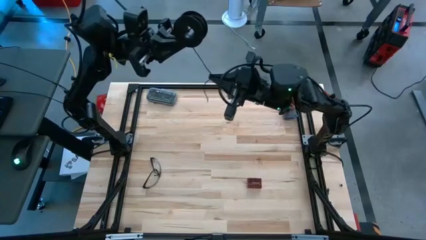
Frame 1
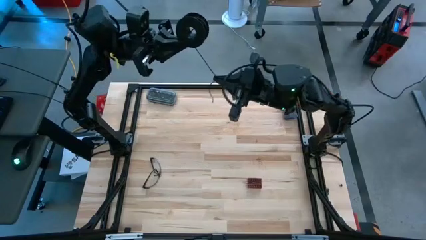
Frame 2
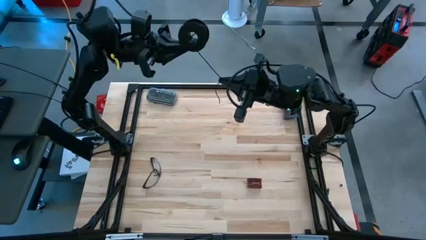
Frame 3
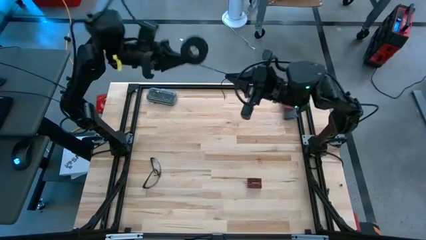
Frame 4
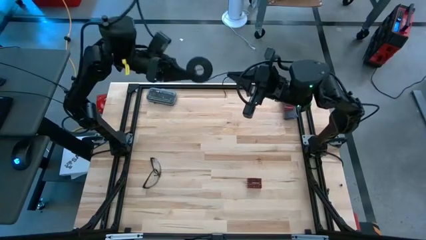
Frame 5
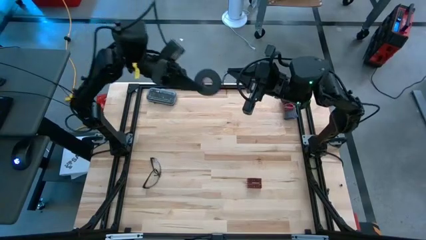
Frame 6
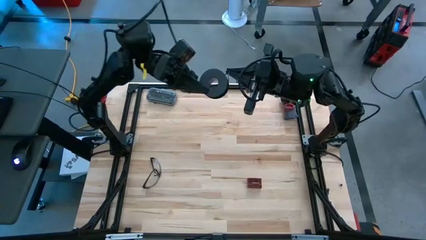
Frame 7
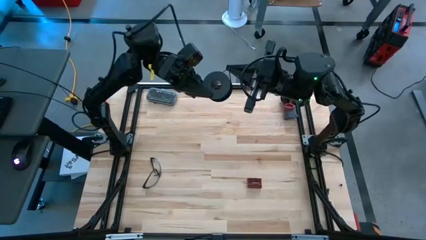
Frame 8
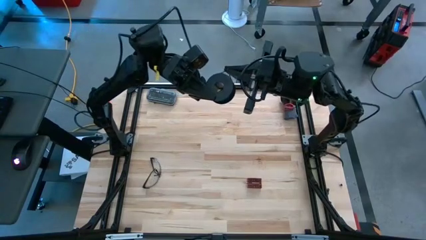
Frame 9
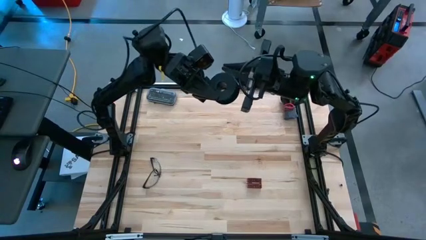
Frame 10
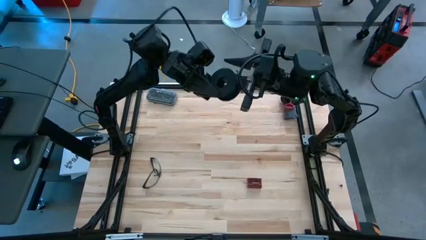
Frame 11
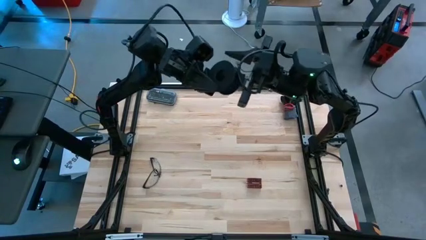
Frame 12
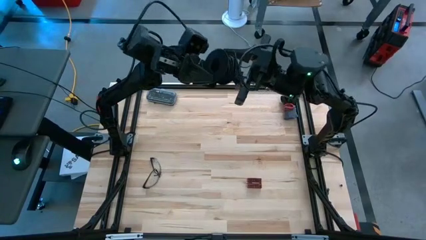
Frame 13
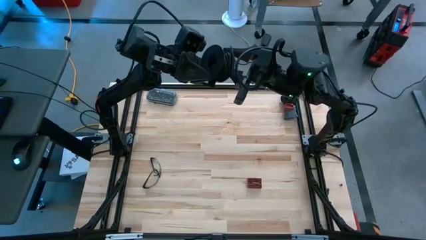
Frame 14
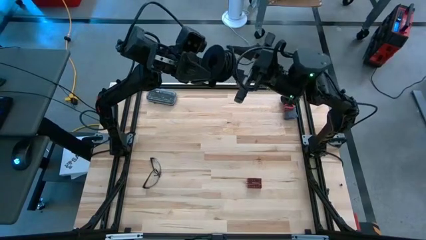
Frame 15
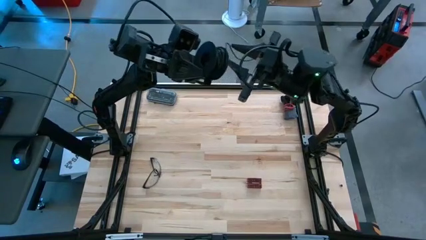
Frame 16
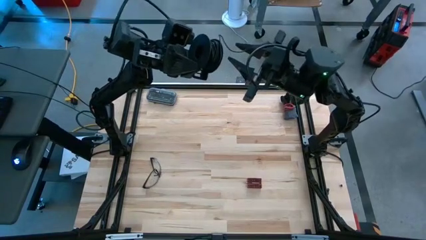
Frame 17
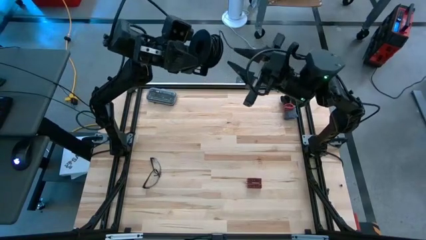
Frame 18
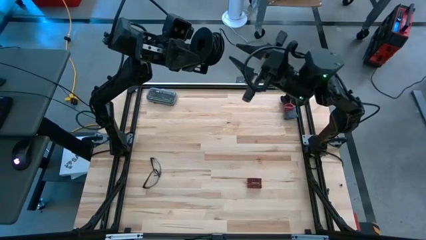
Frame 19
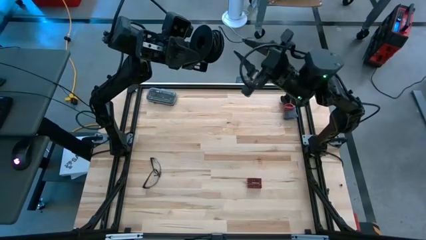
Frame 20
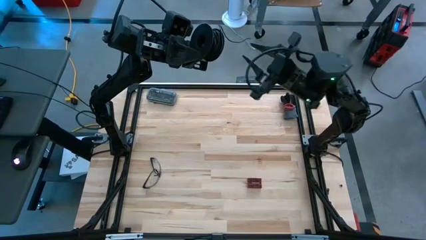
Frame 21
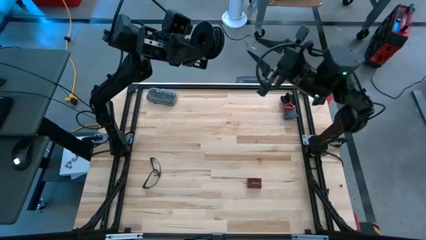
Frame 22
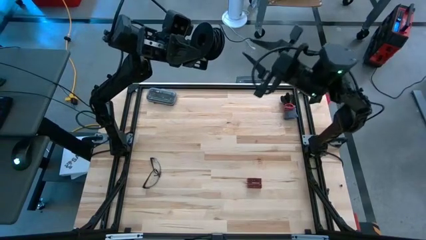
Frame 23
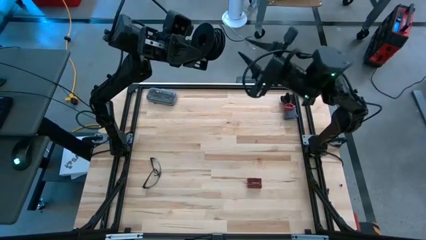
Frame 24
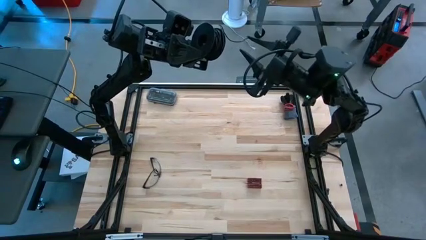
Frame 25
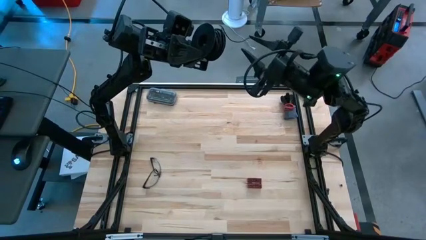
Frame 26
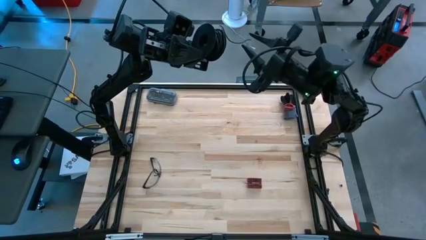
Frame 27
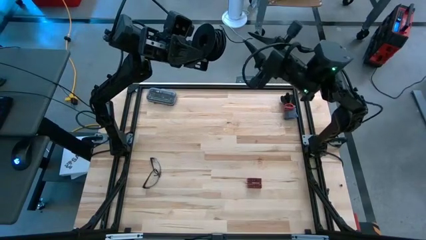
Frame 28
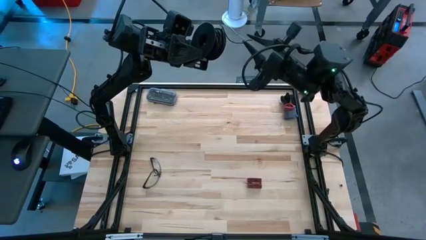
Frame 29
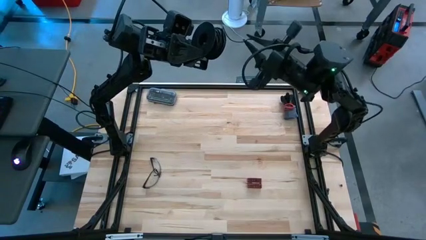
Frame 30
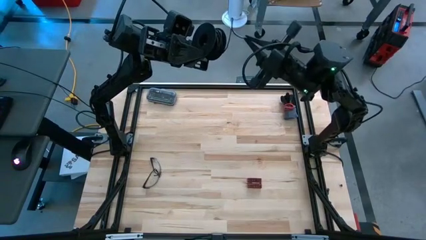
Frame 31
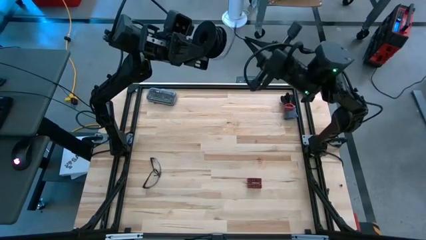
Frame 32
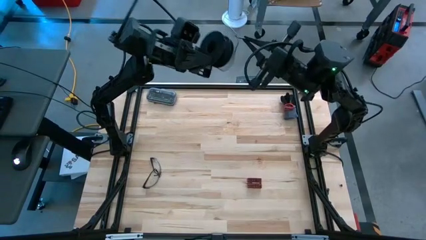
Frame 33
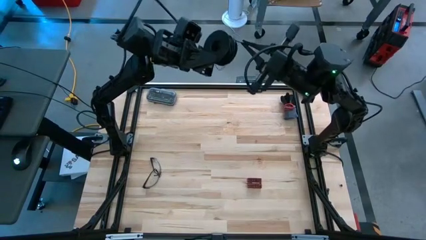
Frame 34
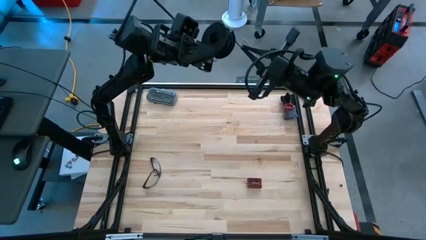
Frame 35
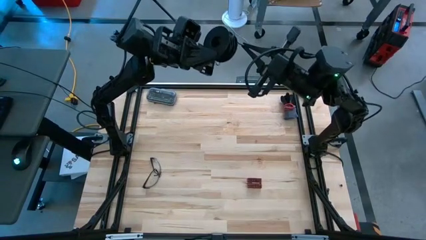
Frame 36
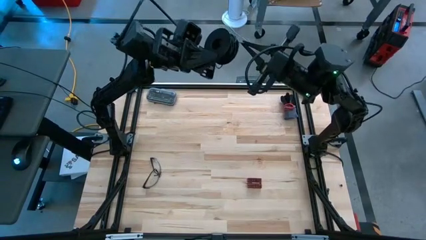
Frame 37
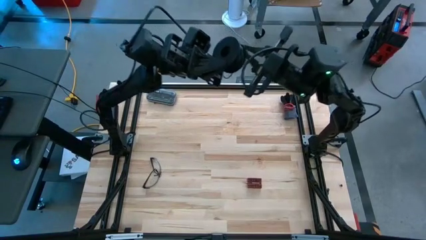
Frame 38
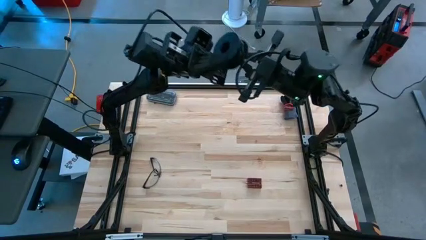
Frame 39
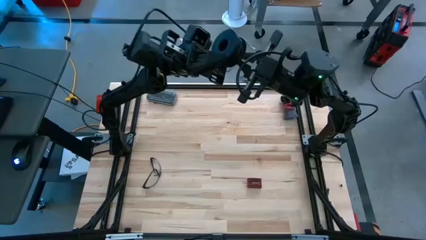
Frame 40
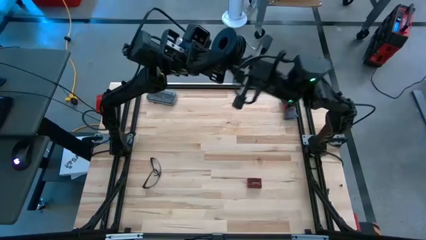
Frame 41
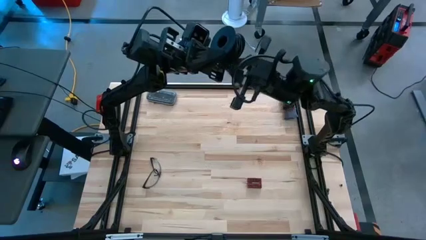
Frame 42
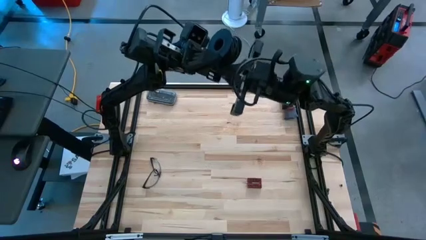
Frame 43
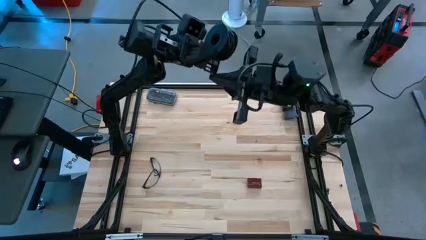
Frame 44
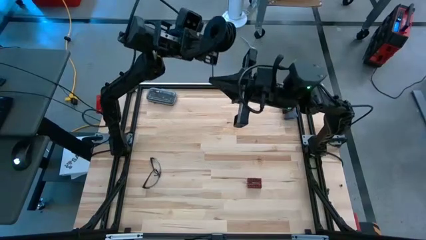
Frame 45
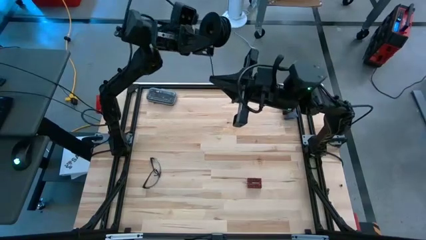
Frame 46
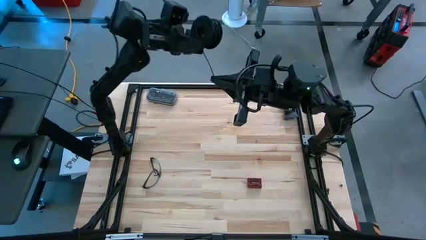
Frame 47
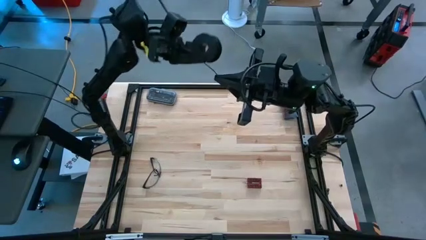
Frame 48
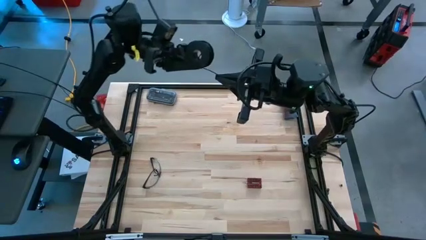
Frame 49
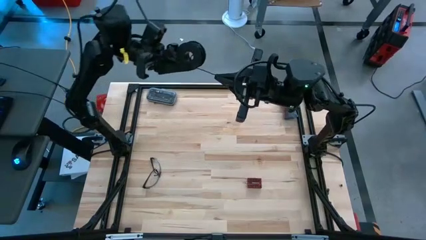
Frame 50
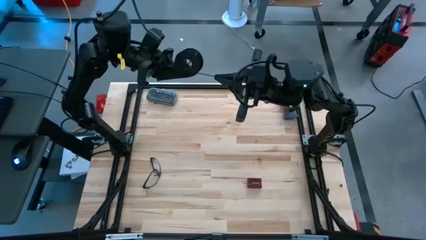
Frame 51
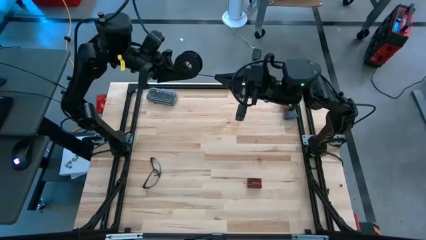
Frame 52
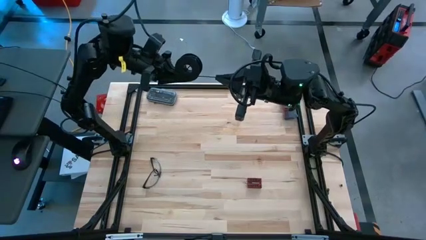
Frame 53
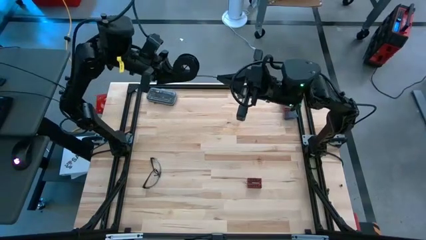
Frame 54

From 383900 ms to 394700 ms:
Task: Coil cords
Coil the black wire into the spool

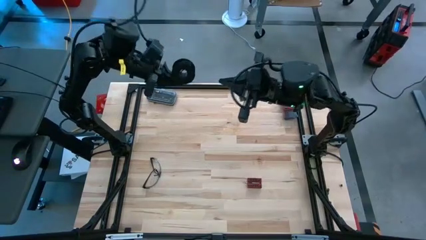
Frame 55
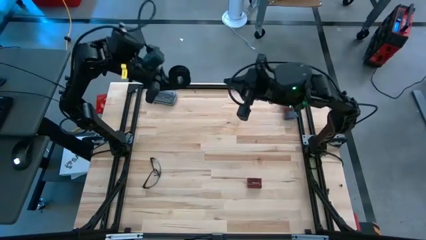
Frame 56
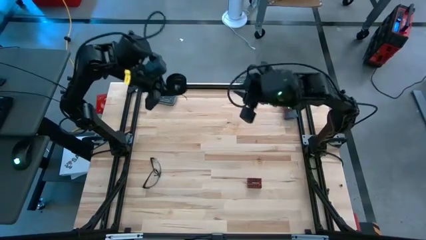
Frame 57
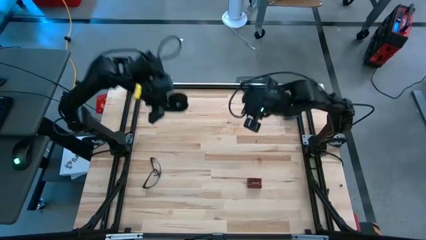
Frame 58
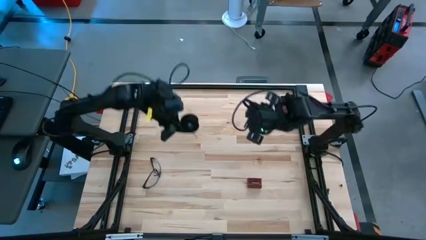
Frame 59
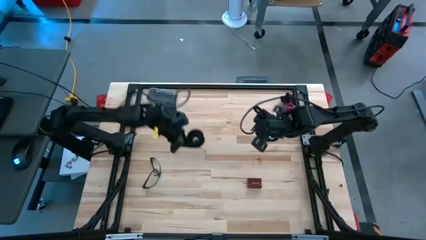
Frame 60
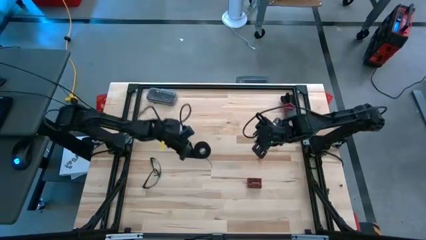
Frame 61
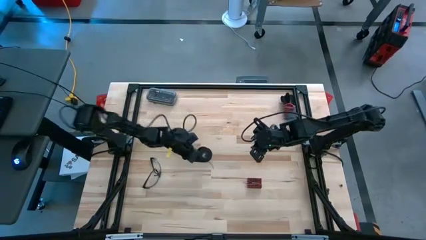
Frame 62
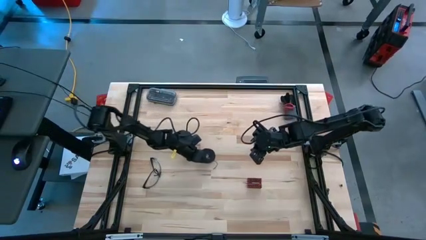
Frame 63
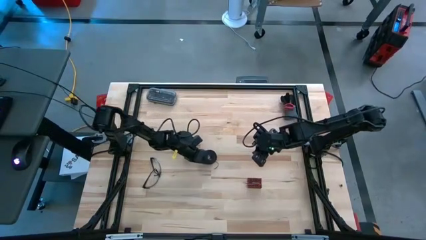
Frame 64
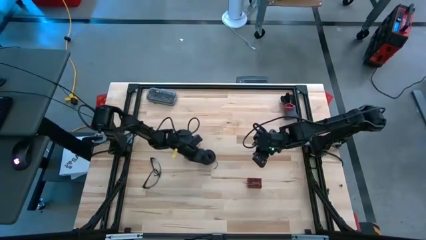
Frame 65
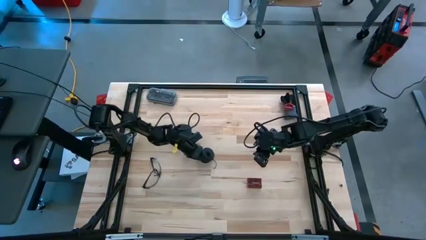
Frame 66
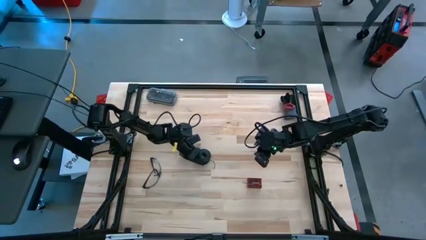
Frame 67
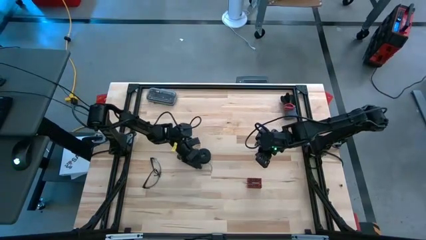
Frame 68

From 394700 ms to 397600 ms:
Put the spooled black wire in the center
